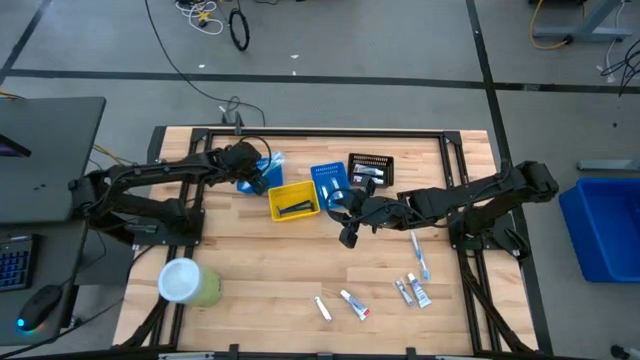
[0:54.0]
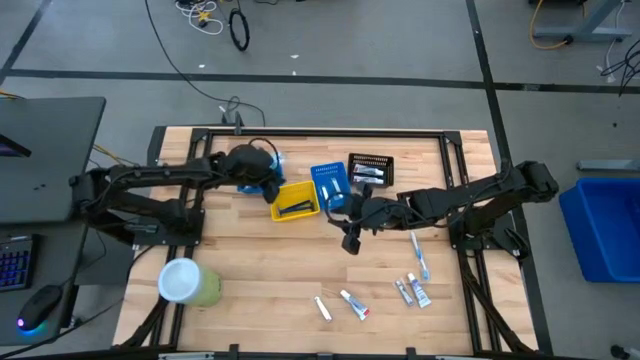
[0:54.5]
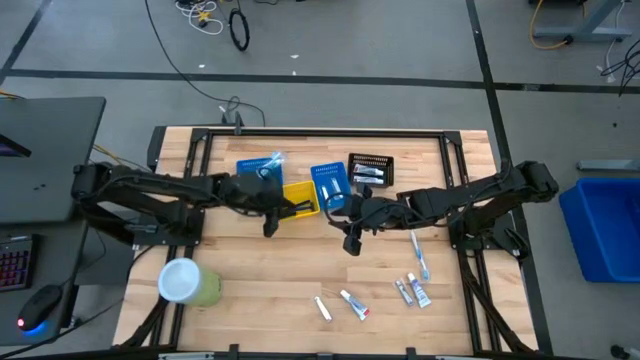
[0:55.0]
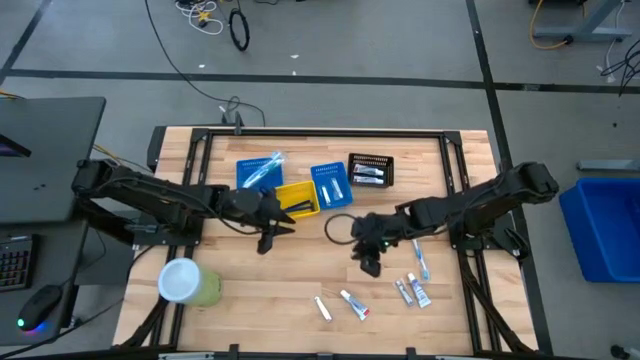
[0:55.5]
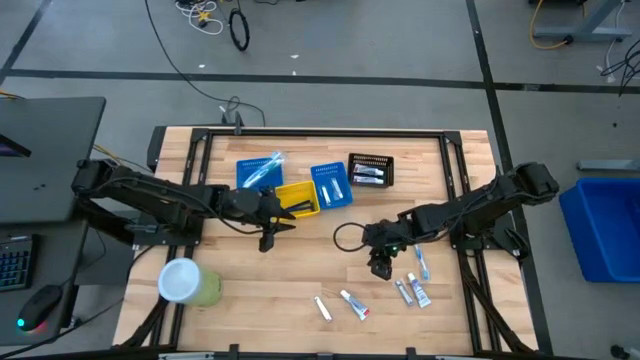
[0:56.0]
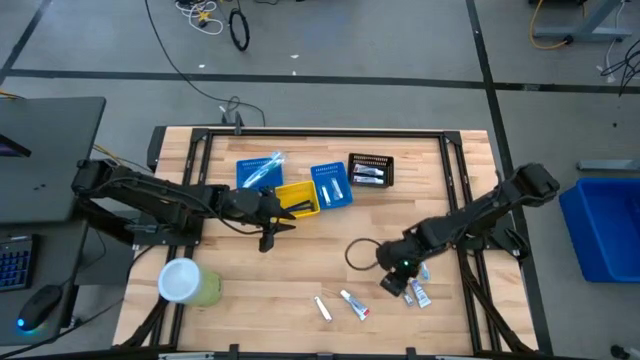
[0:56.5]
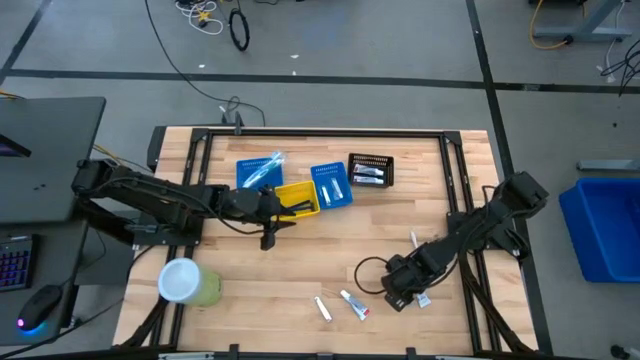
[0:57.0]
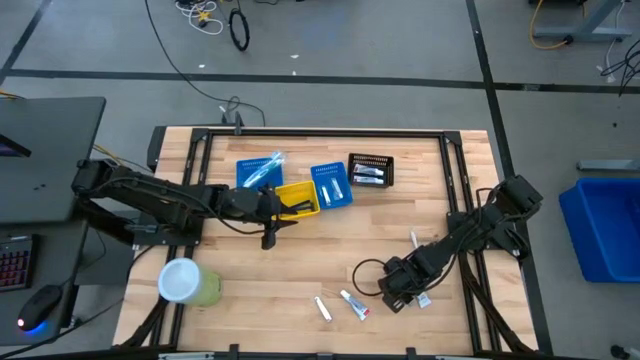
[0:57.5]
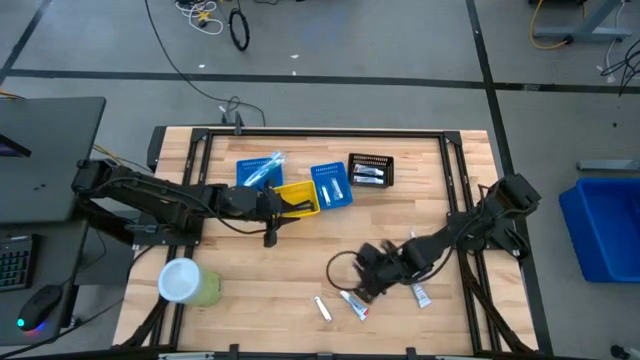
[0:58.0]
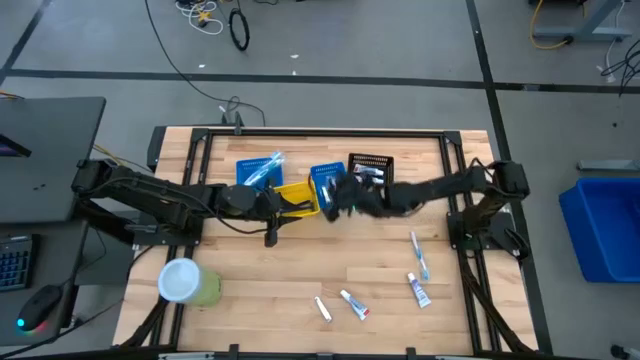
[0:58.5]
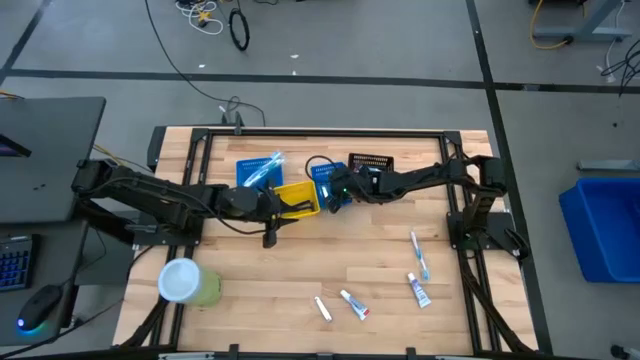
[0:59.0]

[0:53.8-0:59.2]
Task: Pick & Place Travel size toiletries
Put the nail cutter into the right blue bin

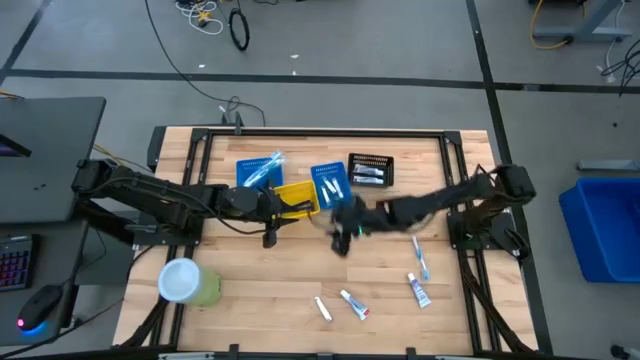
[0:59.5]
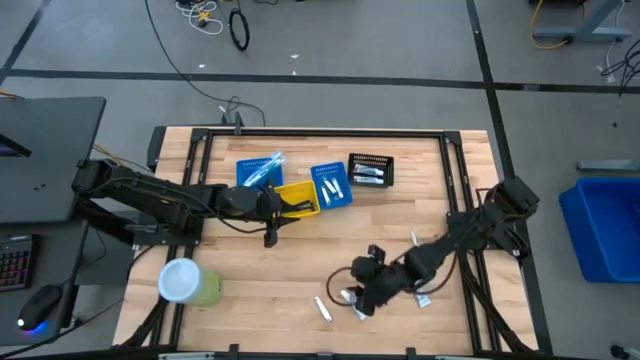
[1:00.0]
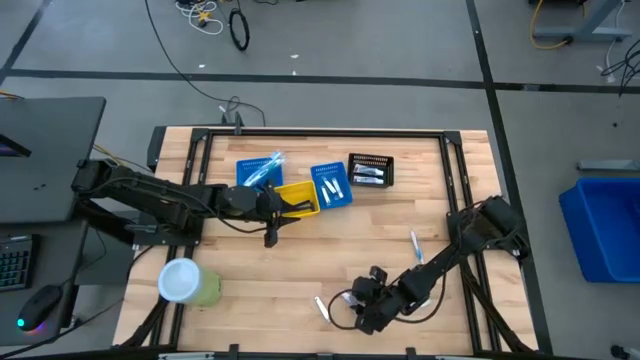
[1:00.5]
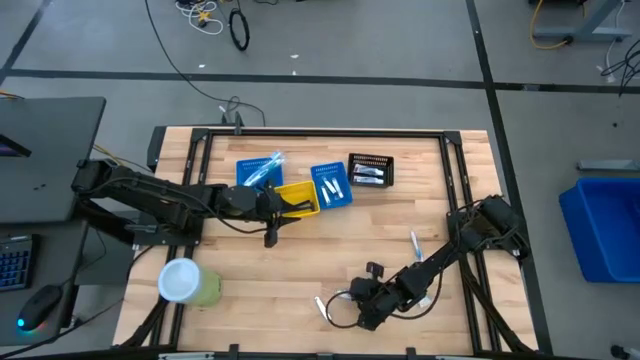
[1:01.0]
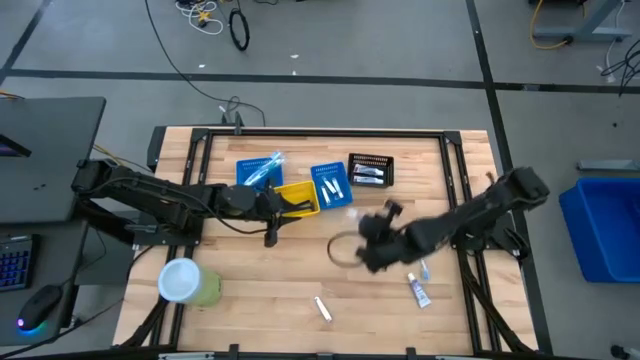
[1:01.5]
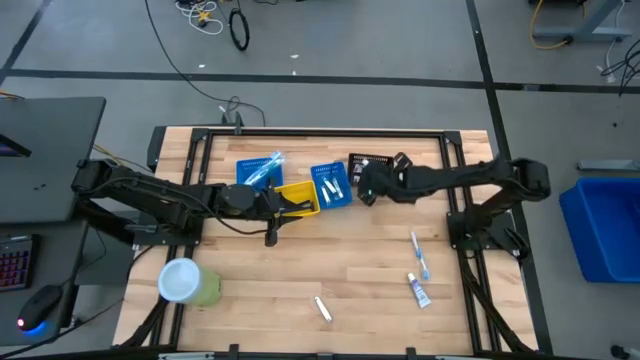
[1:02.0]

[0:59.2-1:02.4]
Put the toothpaste into the black bin

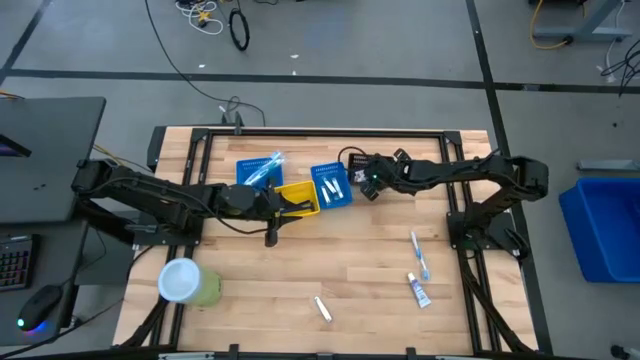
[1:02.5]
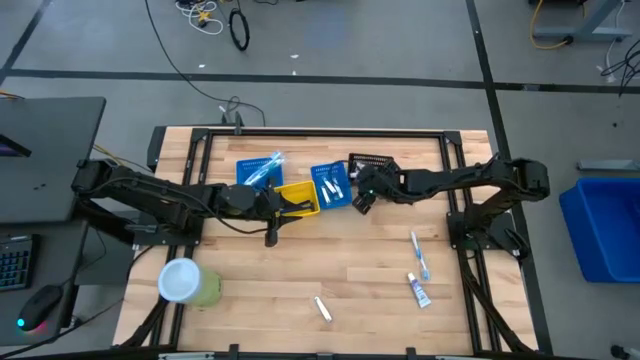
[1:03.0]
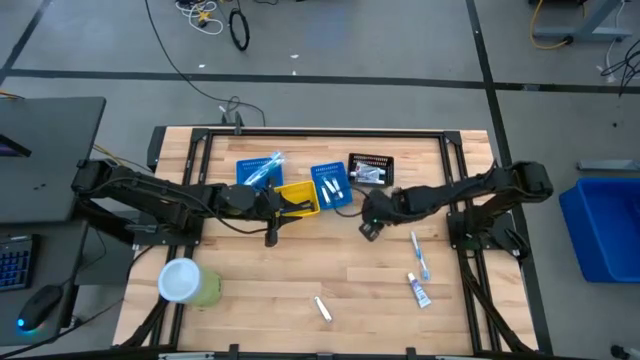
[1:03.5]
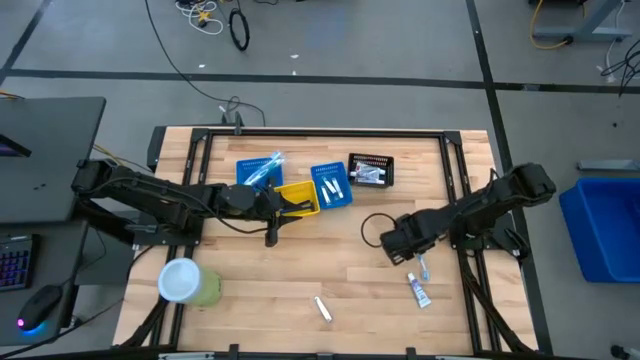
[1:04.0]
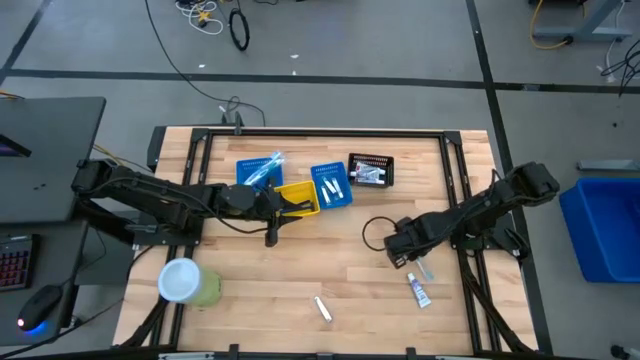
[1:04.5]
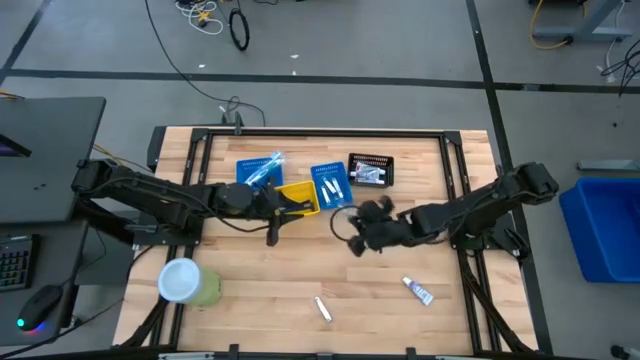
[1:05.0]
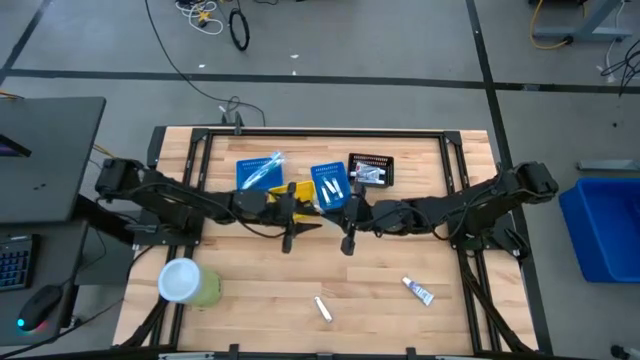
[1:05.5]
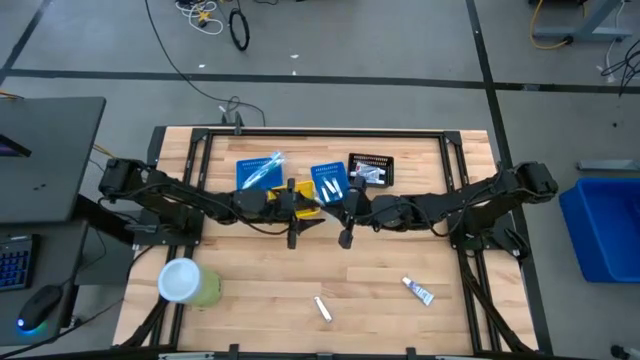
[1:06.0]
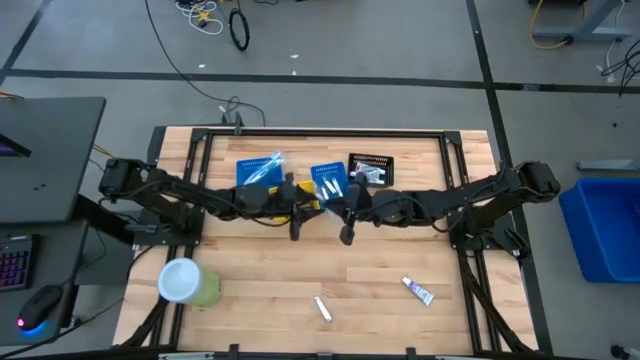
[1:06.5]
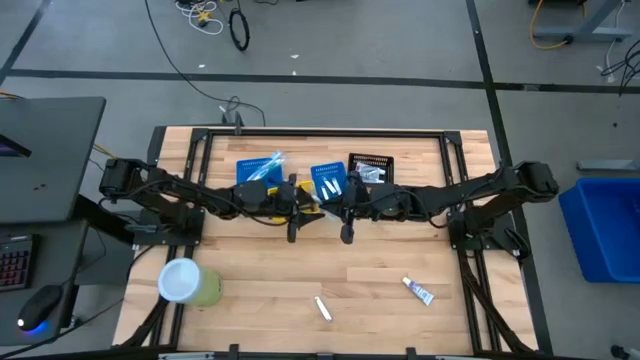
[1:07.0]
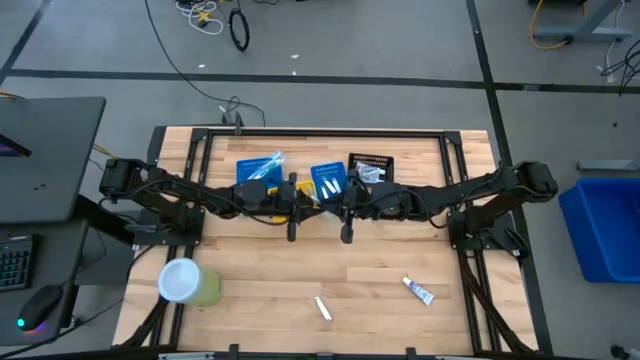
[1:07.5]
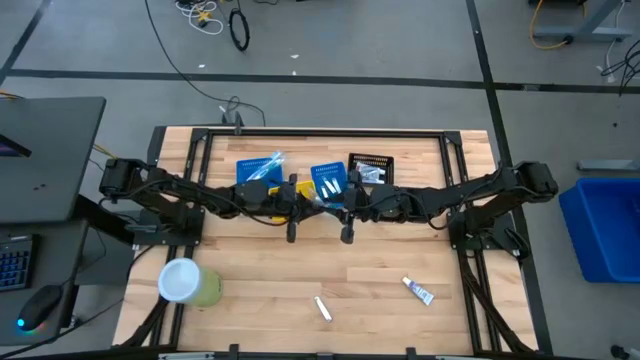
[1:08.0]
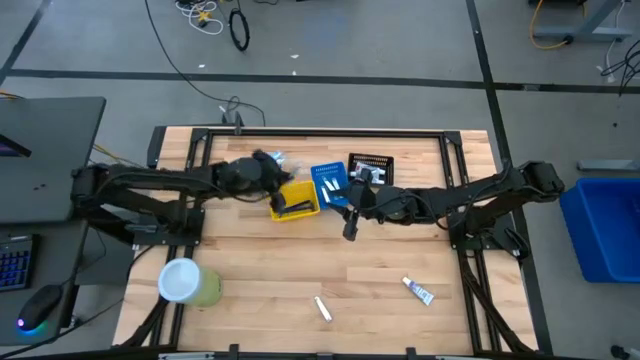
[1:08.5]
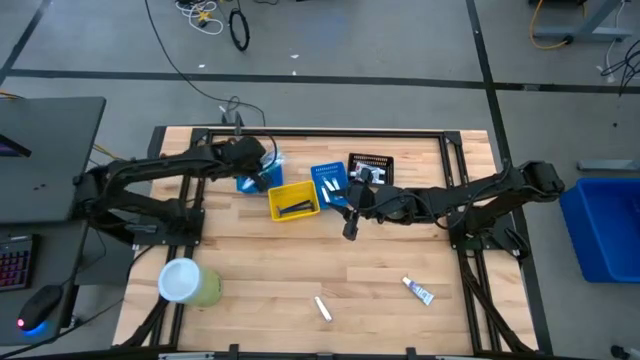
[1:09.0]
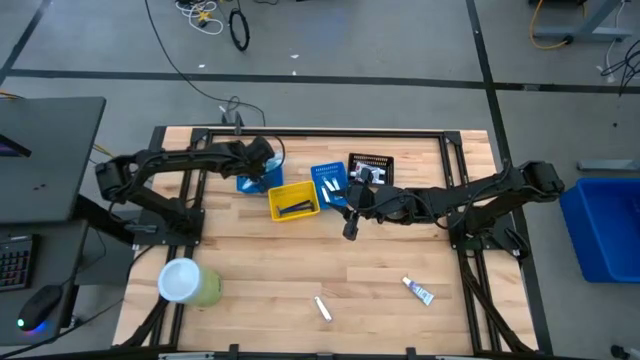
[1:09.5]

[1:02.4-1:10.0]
Put the blue toothbrush into the left blue bin

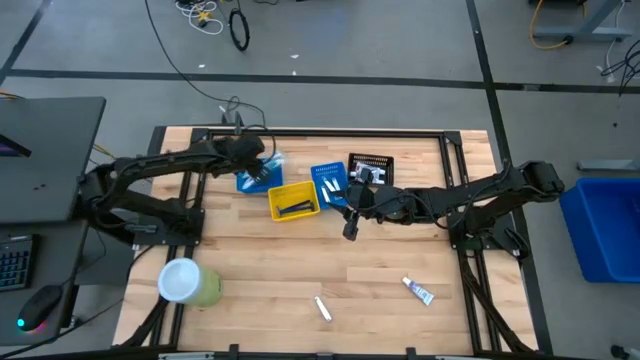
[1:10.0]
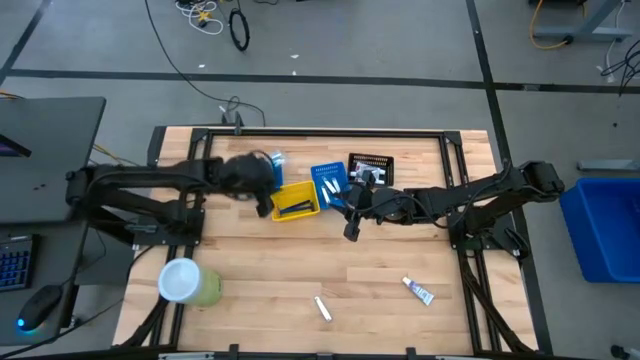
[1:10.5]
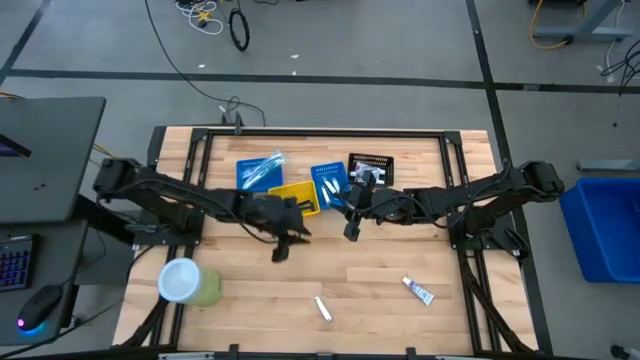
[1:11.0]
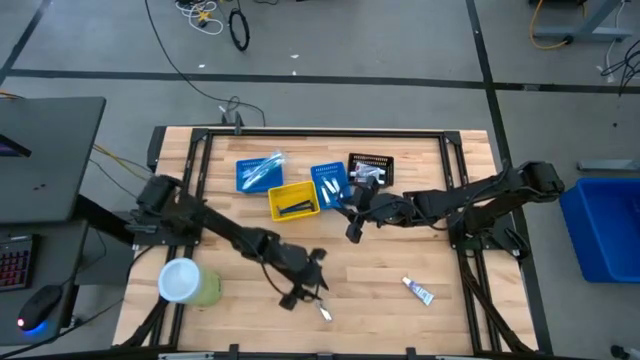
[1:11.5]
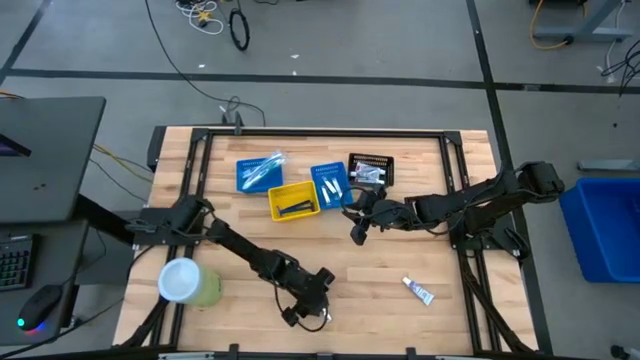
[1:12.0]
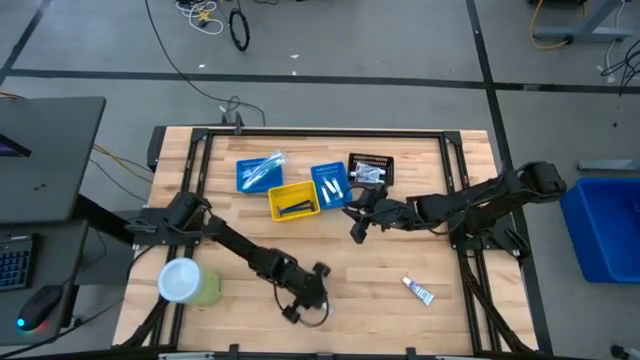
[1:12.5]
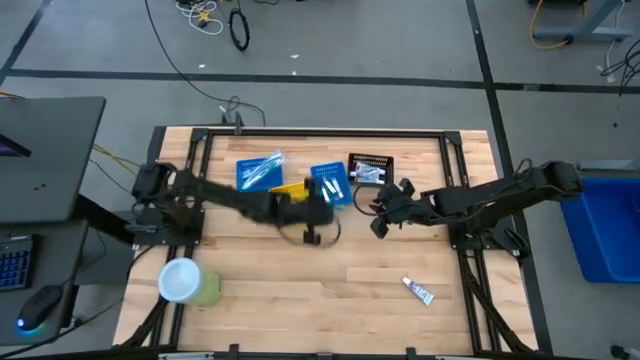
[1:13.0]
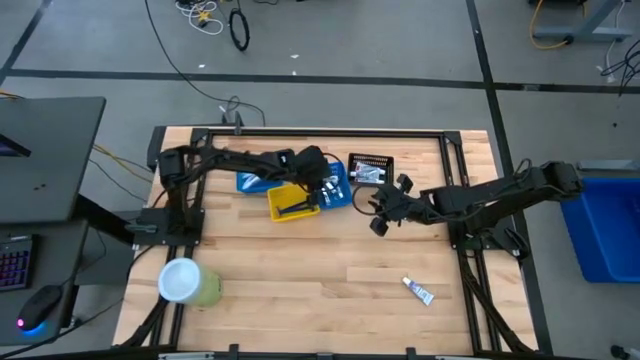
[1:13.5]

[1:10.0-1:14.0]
Put the nail cutter into the right blue bin

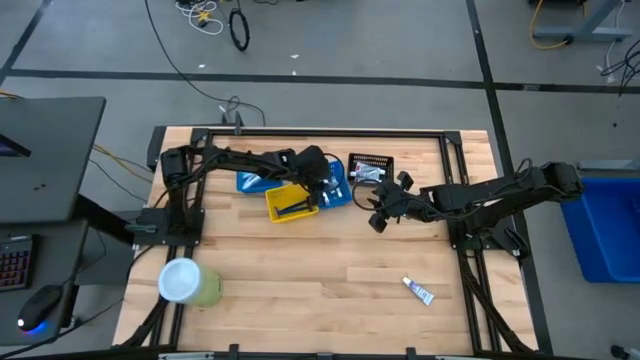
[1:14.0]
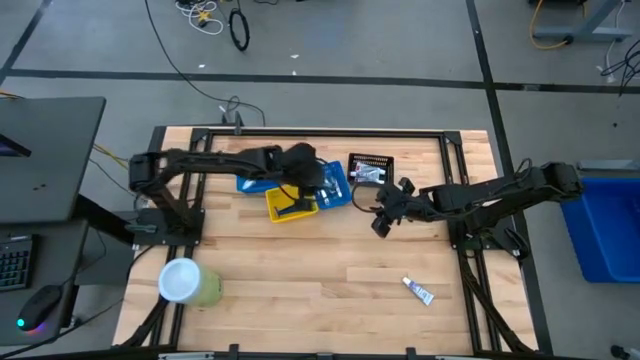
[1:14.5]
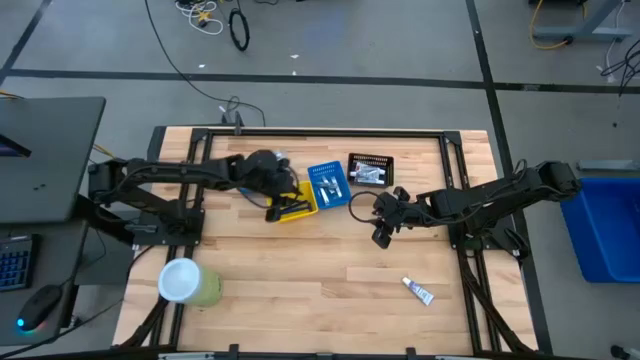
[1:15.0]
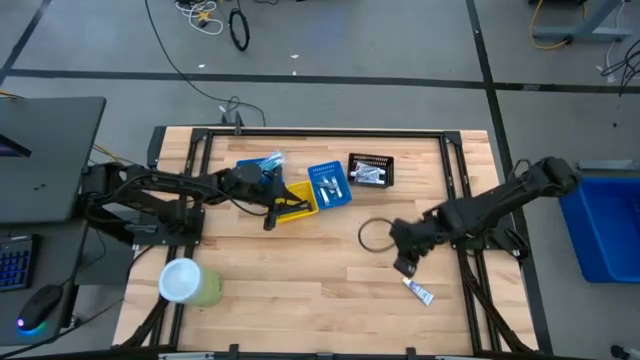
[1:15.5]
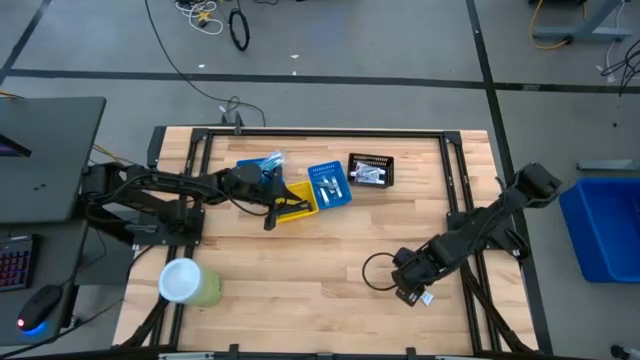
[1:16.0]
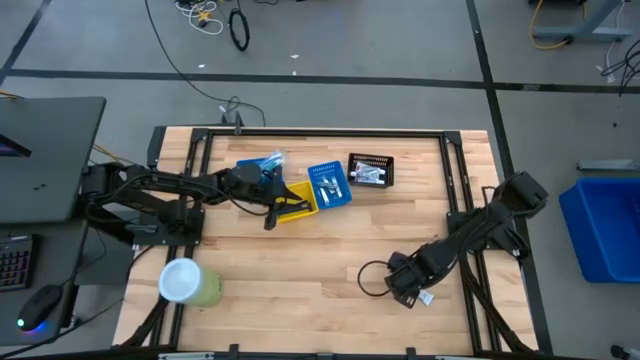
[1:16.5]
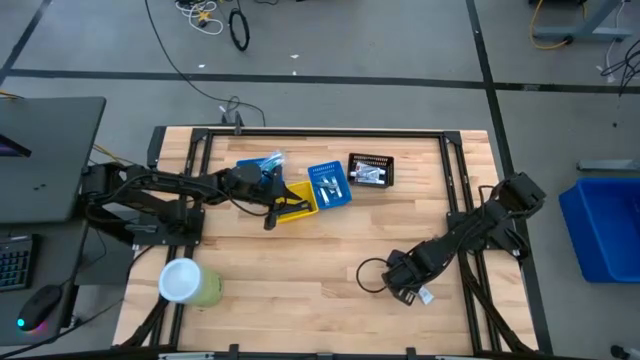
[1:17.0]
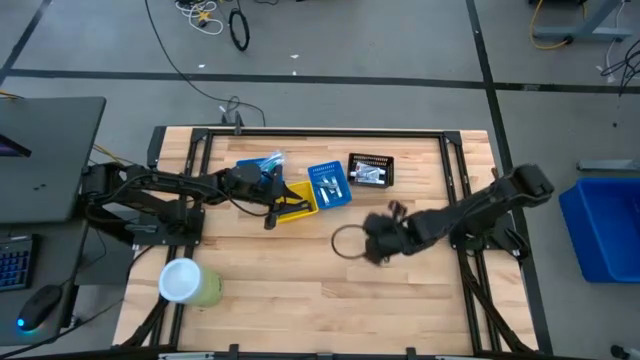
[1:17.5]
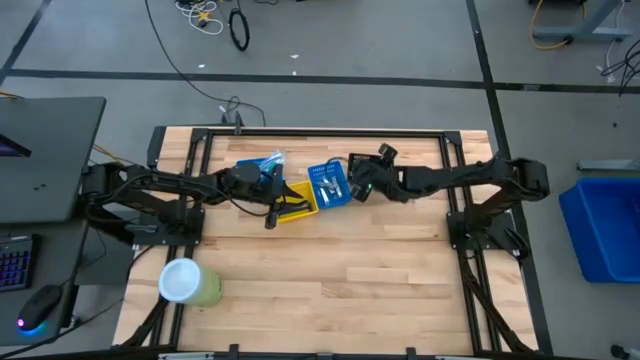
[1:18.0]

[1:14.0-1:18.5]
Put the toothpaste into the black bin
